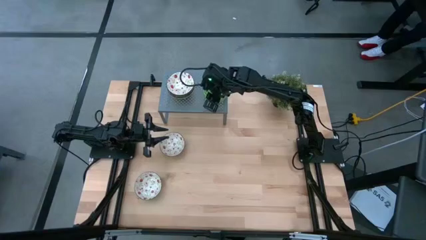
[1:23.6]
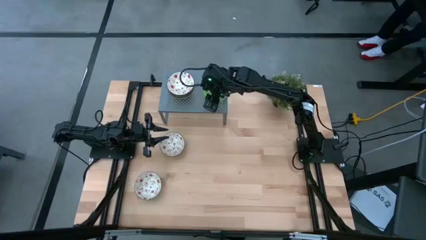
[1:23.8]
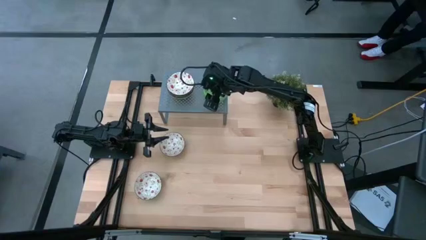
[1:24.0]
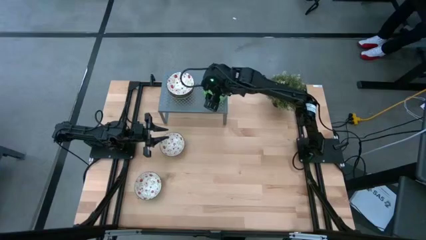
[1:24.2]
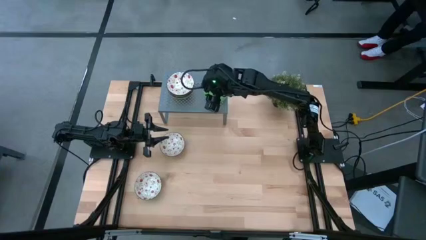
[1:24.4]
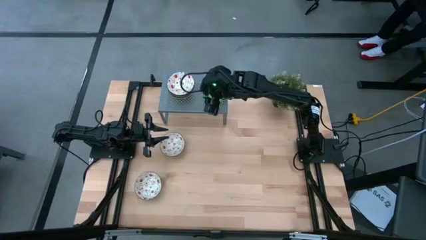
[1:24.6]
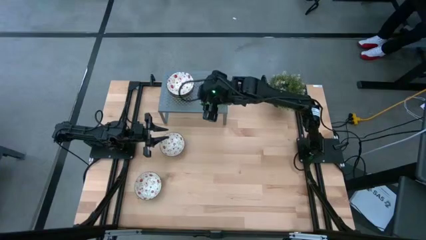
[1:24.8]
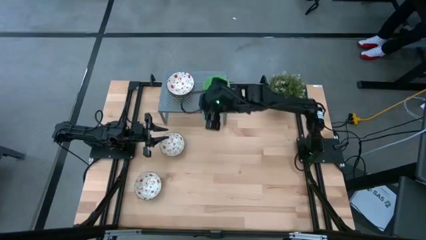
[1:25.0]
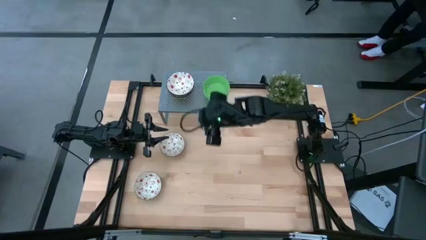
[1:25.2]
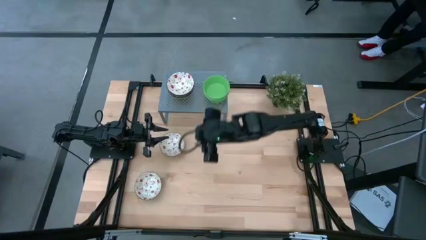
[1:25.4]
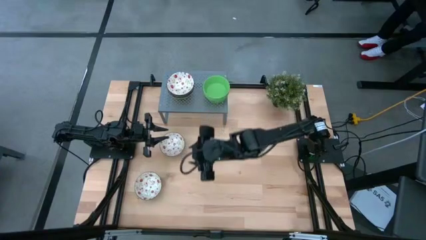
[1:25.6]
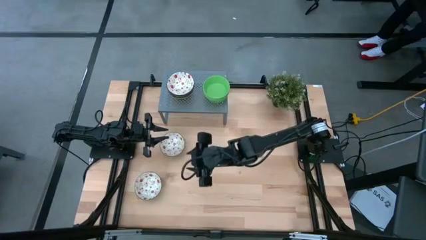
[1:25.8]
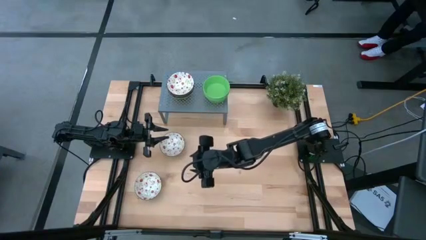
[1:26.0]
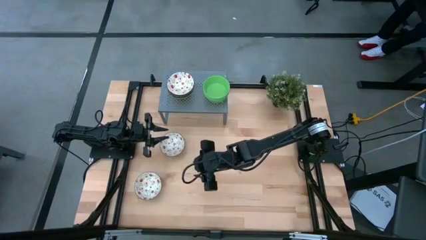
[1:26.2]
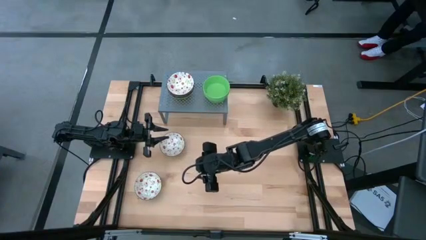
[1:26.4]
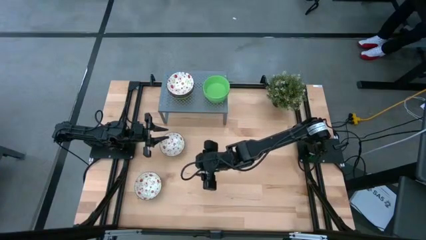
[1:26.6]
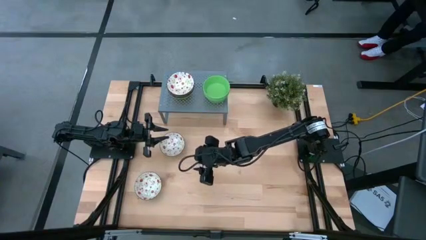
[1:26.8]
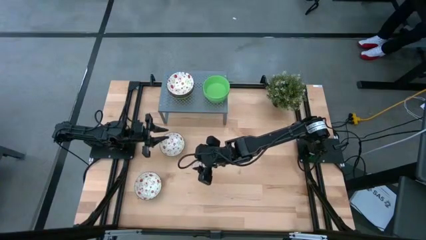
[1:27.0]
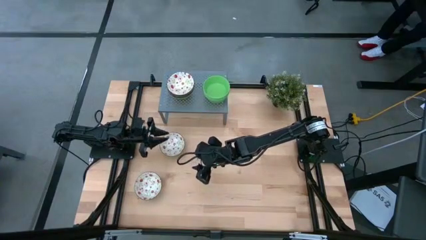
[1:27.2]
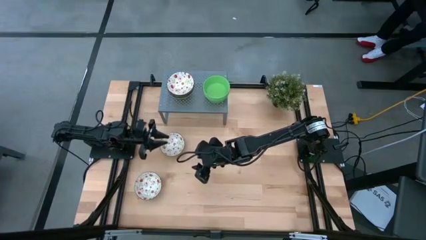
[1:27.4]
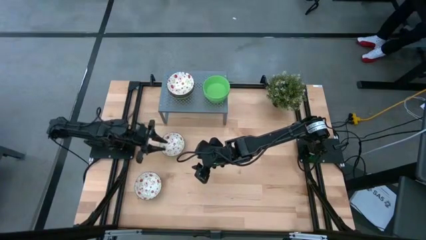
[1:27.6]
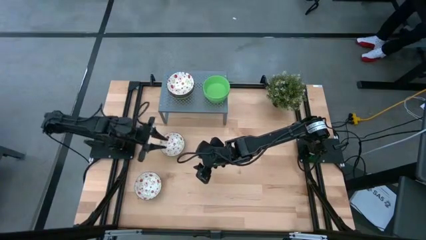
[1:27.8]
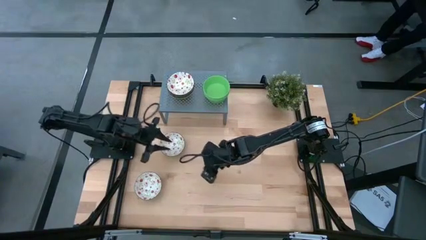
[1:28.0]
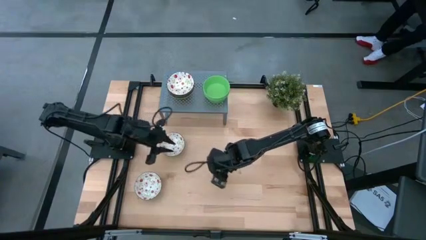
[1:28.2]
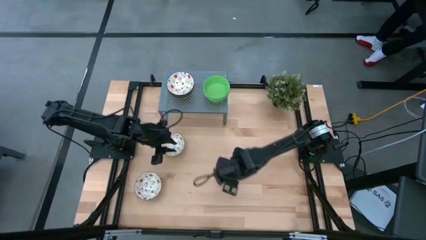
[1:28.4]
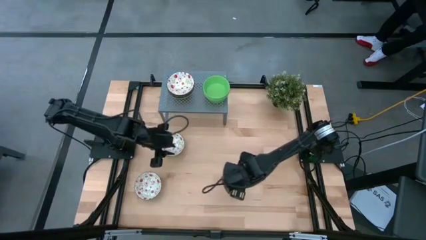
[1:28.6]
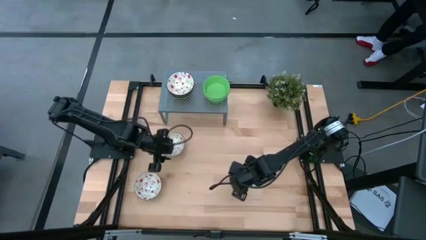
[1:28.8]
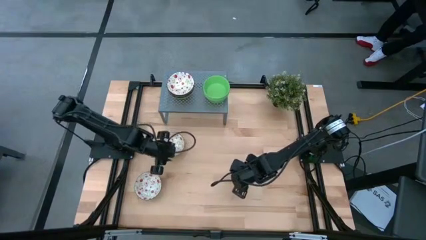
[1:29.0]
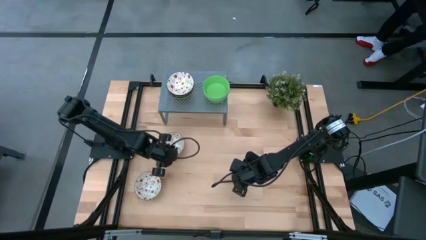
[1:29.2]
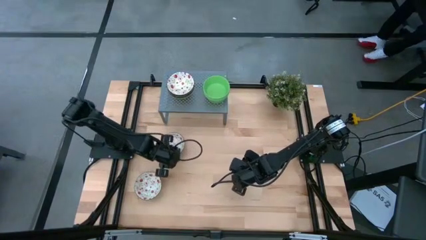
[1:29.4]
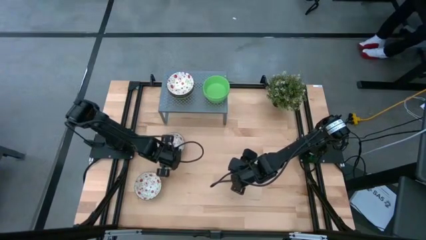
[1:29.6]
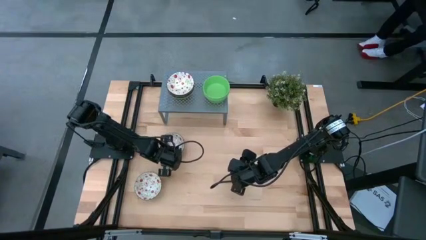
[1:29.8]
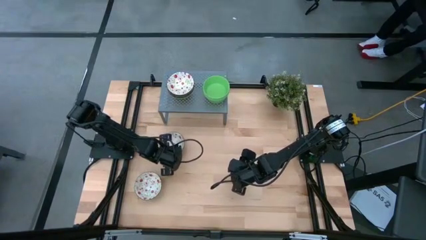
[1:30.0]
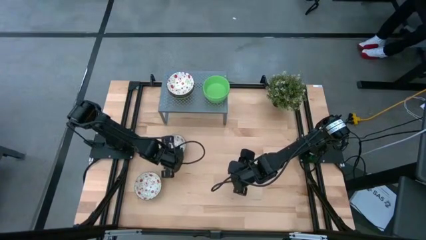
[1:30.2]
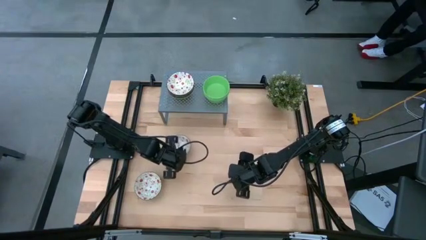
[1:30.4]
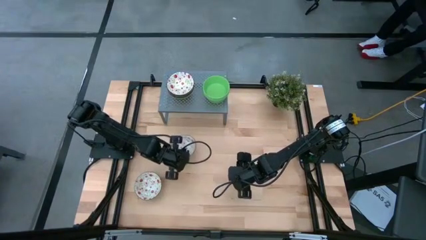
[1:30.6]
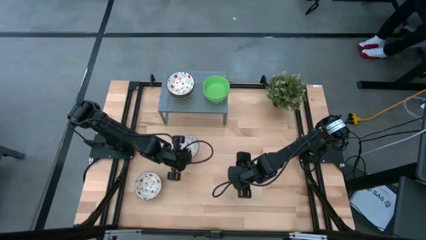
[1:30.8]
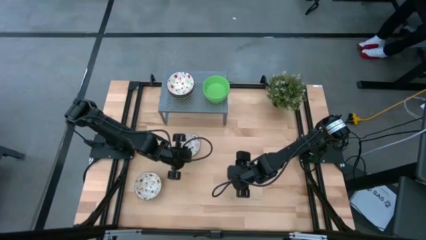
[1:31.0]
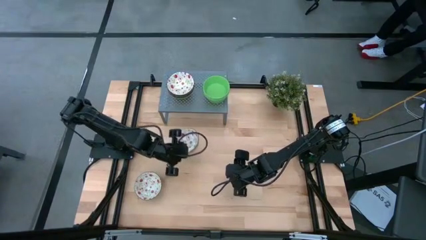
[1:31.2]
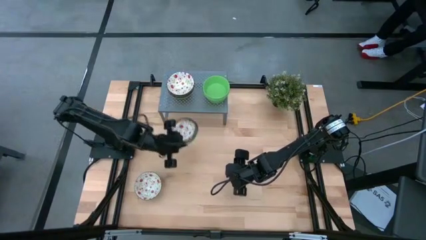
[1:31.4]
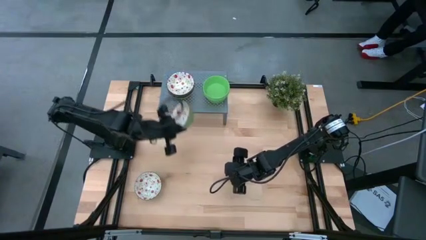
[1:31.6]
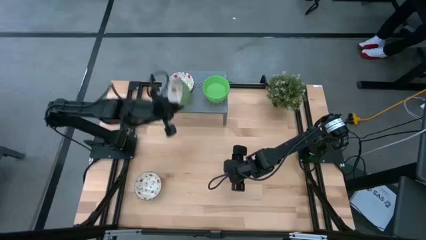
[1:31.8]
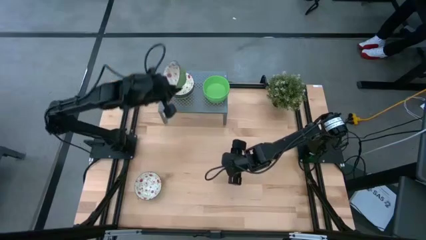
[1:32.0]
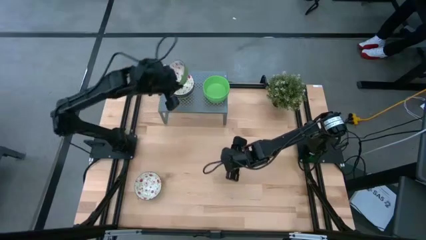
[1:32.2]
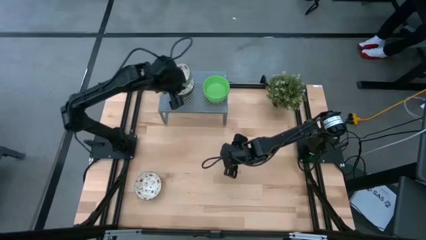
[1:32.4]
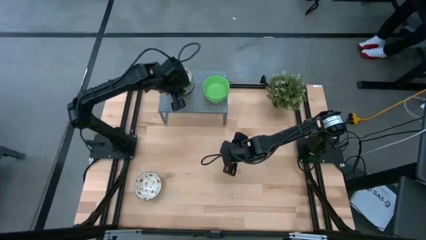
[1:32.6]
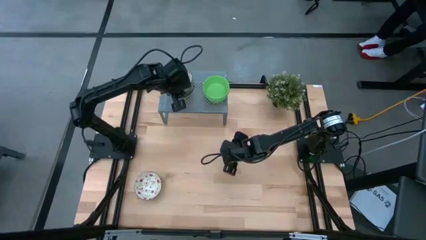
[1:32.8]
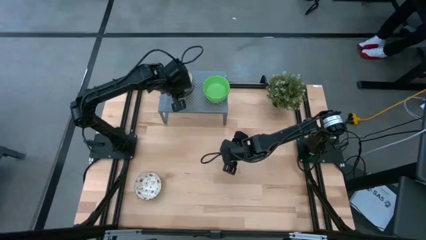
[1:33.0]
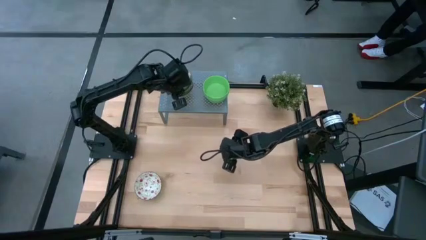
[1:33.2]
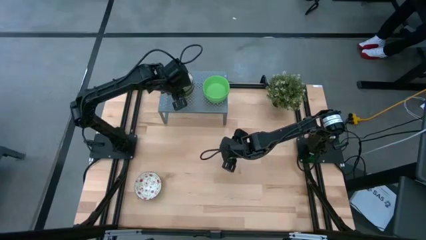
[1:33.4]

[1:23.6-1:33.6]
Task: Pick & Place Mini bowls
Stack the white patterned bowl on the white patterned bowl on the shelf

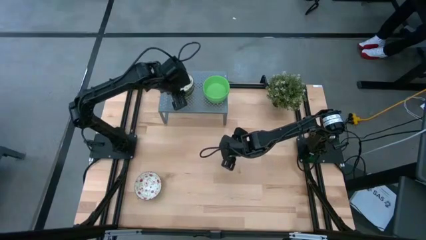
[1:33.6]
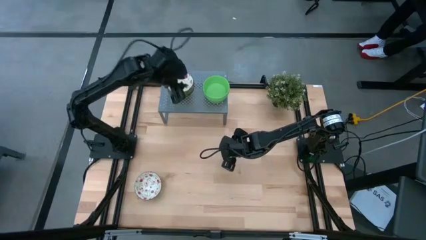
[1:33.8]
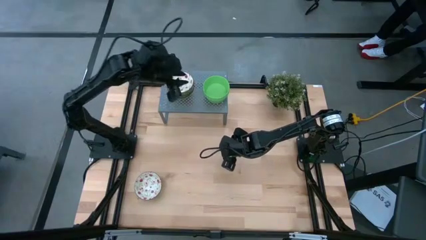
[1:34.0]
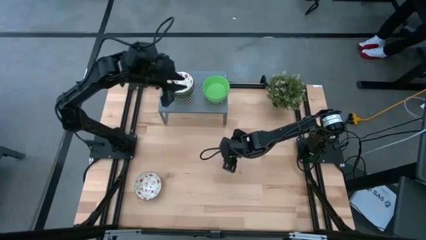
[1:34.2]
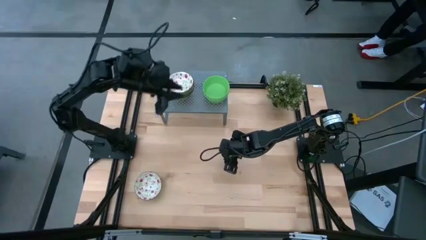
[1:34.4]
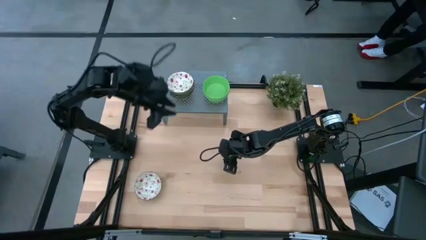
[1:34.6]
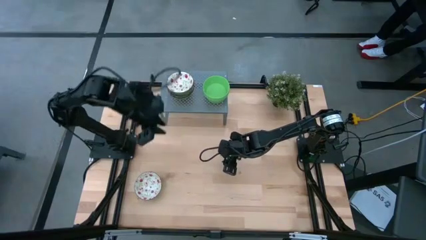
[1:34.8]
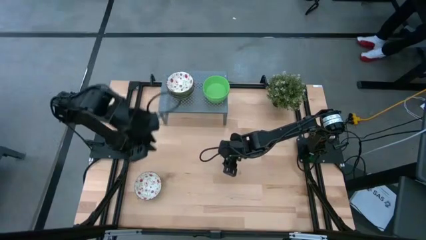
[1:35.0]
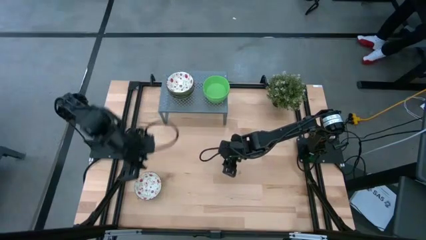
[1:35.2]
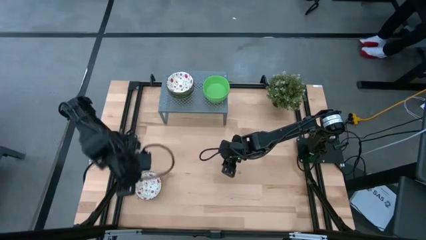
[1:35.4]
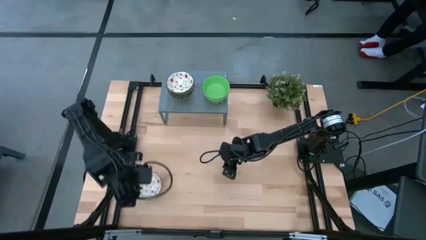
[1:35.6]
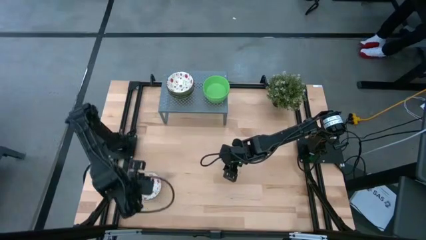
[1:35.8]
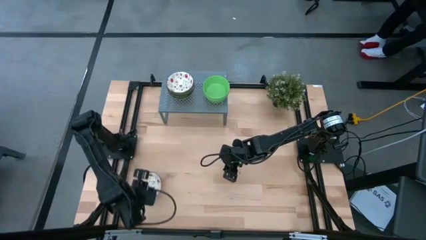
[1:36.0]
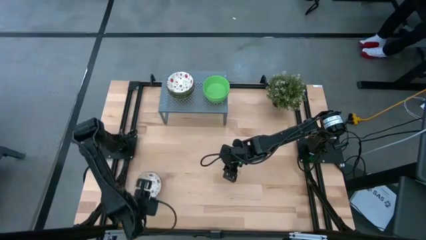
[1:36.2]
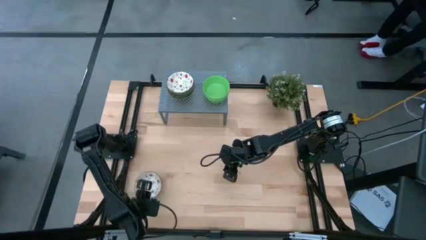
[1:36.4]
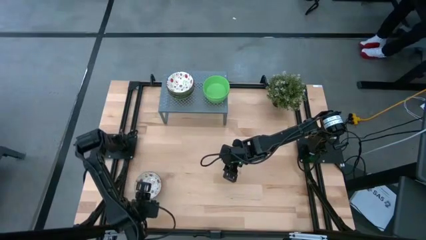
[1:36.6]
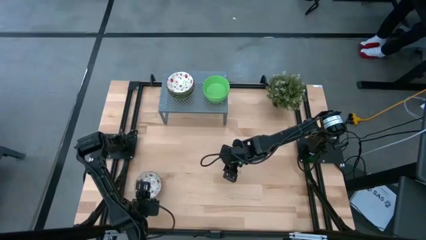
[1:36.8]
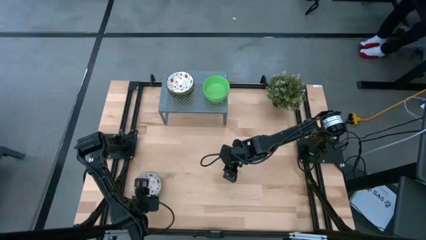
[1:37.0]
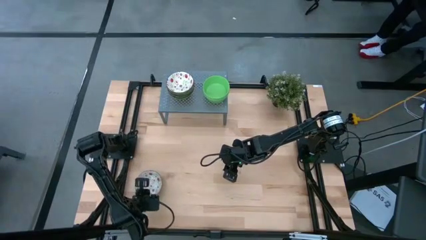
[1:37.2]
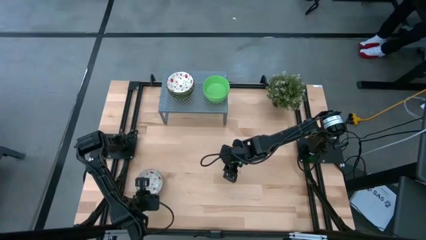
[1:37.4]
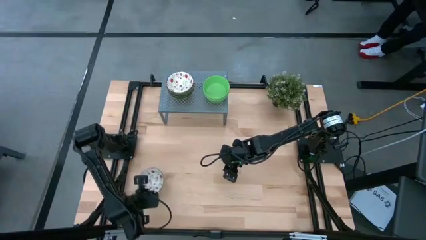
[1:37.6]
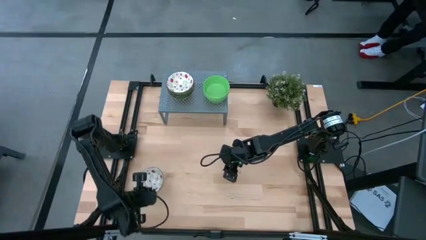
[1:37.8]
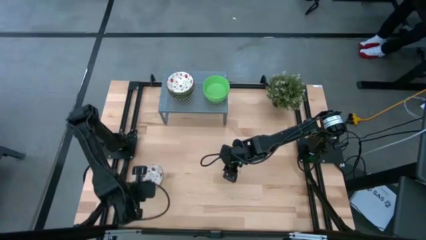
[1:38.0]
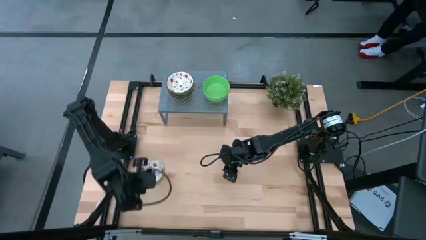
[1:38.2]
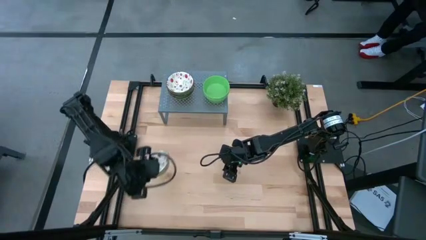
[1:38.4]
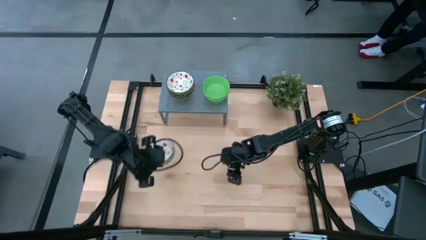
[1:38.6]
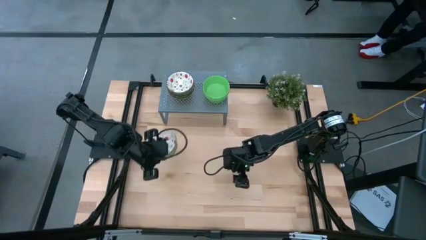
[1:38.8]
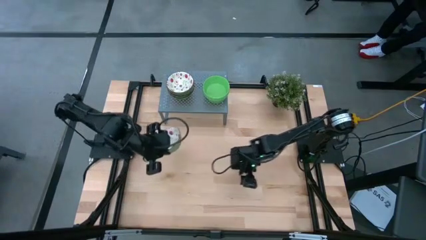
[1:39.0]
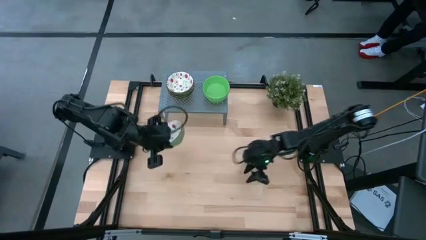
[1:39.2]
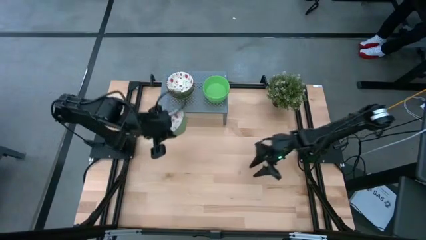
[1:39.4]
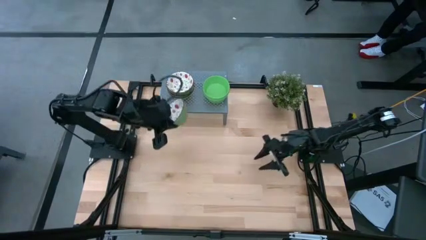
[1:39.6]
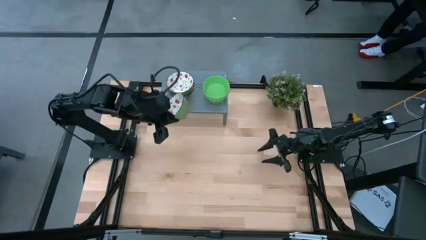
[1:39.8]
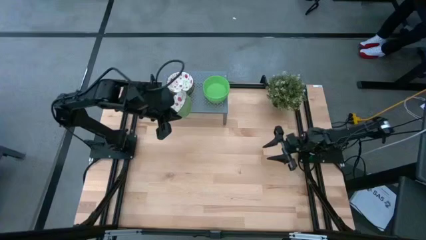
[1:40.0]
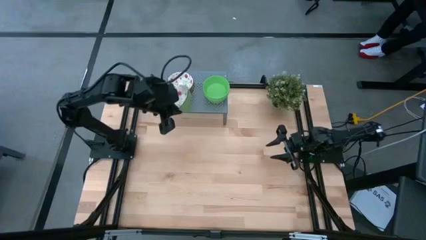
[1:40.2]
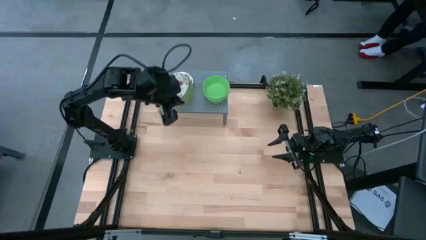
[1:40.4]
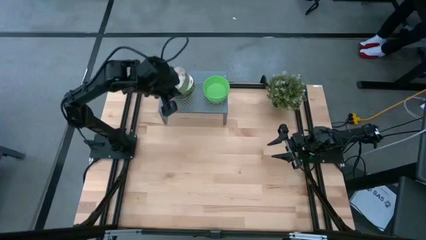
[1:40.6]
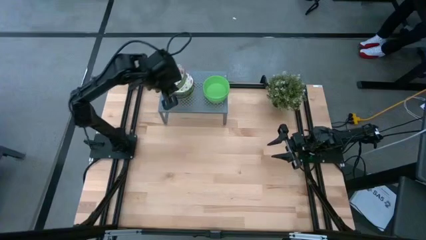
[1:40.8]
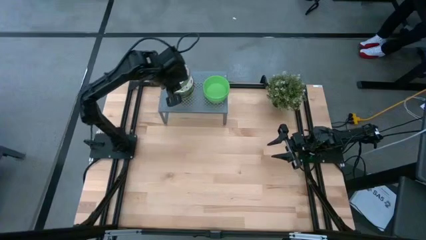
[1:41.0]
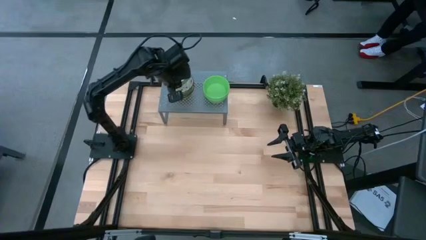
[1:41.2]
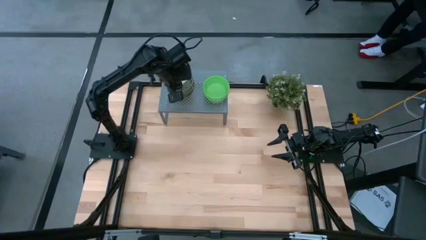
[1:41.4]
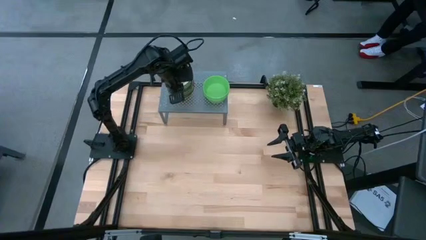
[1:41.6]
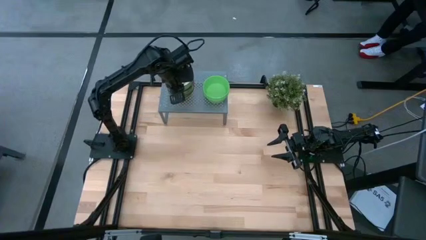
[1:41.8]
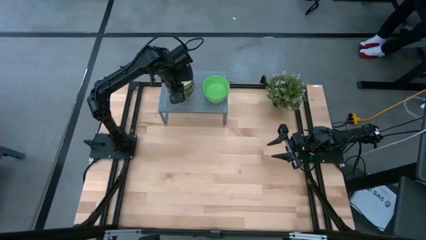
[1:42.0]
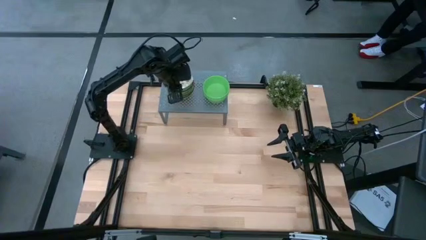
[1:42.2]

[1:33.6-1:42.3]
Stack the white patterned bowl on the white patterned bowl on the shelf
